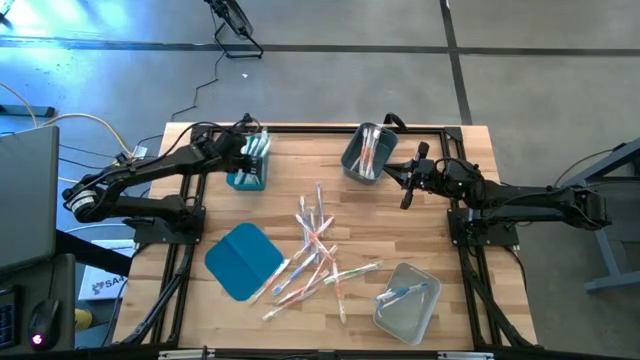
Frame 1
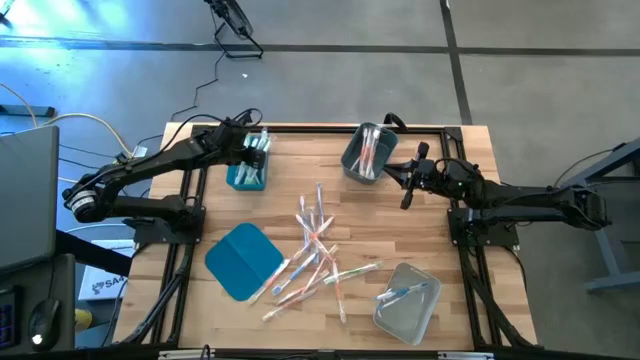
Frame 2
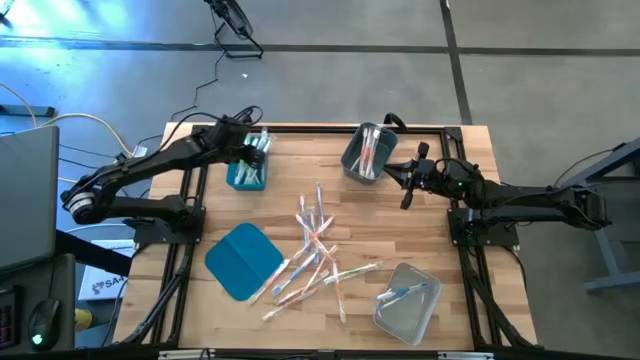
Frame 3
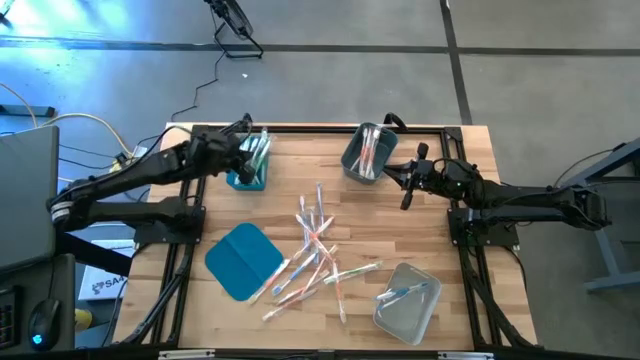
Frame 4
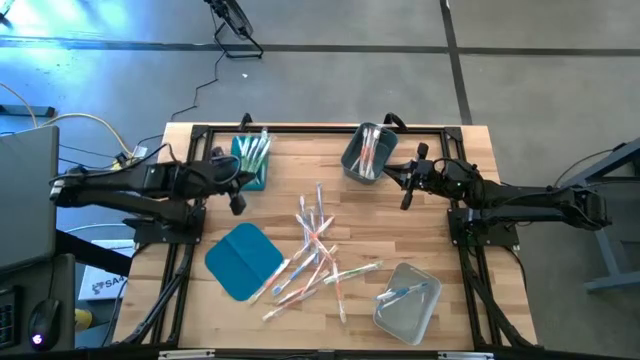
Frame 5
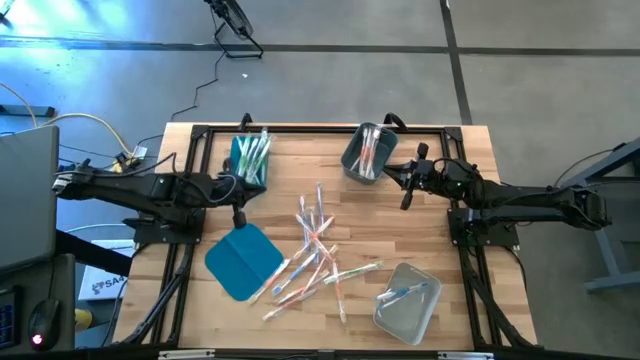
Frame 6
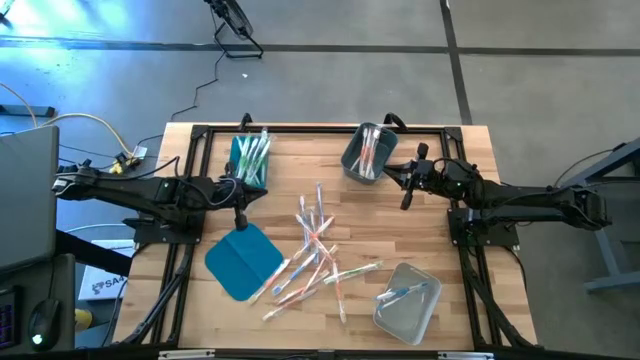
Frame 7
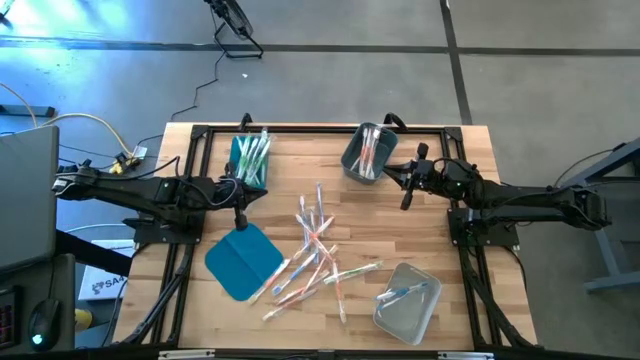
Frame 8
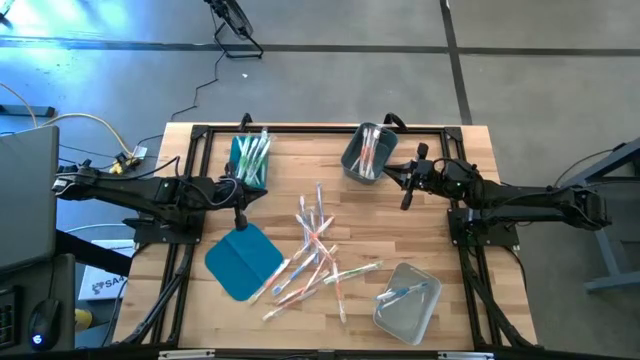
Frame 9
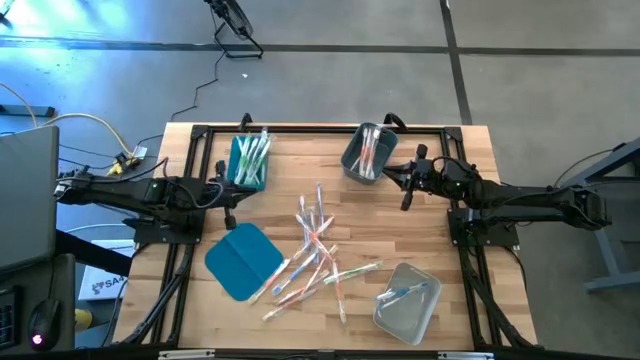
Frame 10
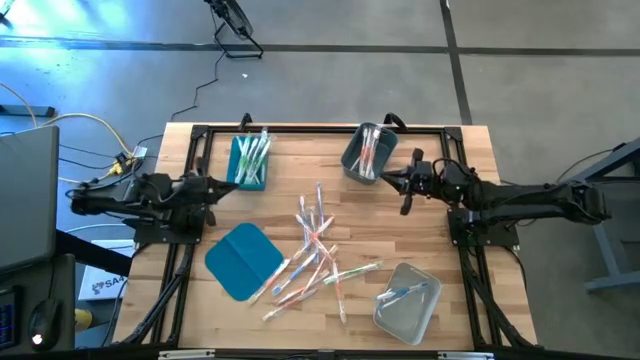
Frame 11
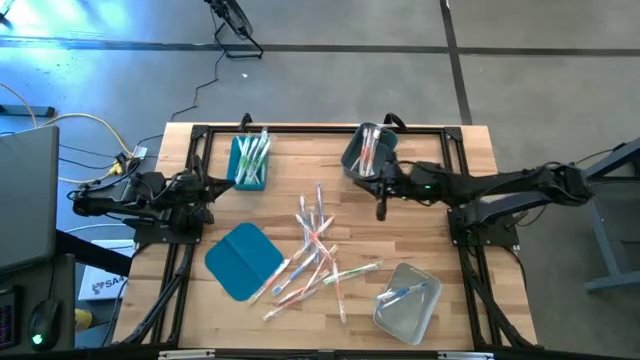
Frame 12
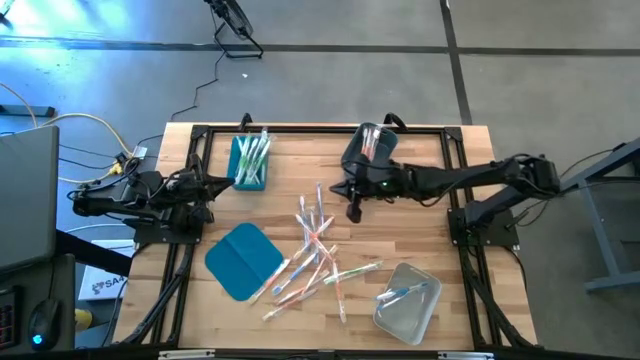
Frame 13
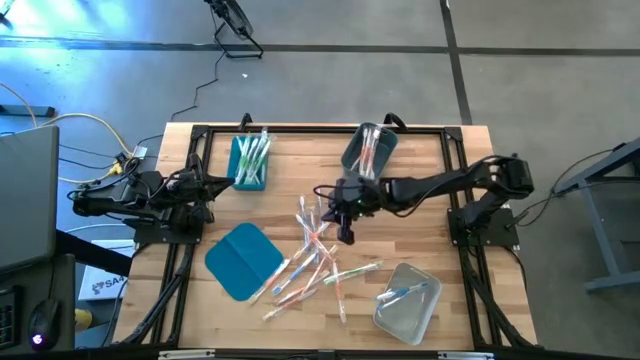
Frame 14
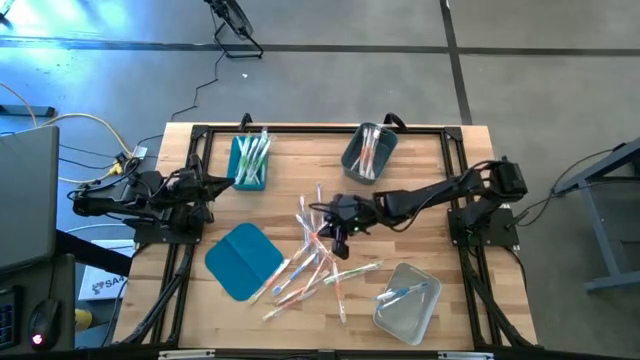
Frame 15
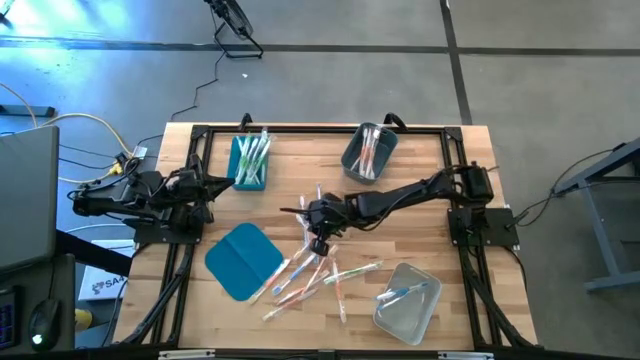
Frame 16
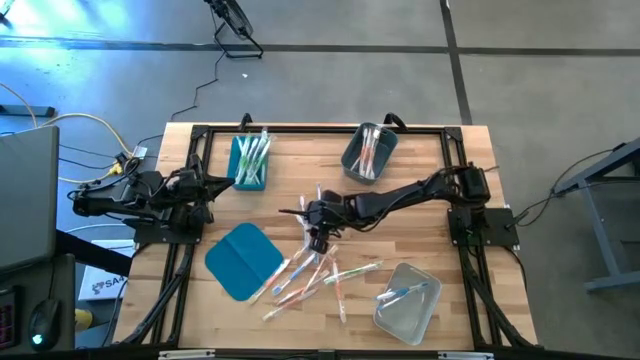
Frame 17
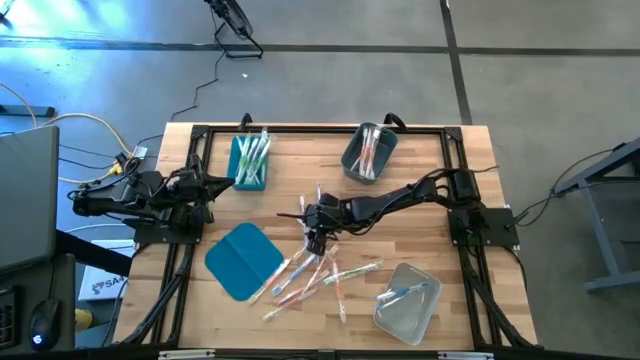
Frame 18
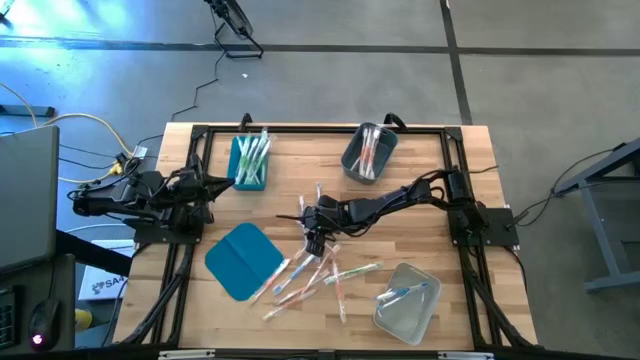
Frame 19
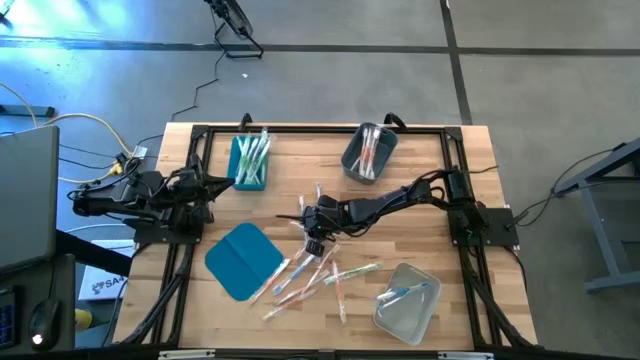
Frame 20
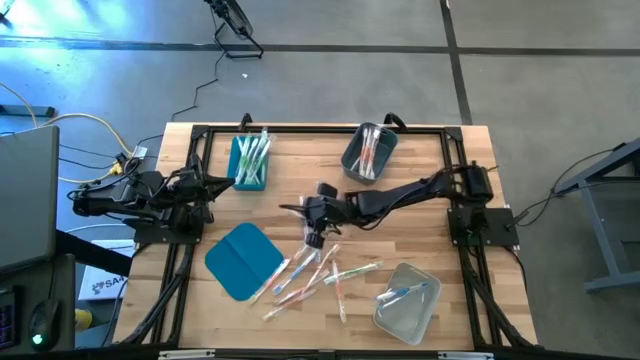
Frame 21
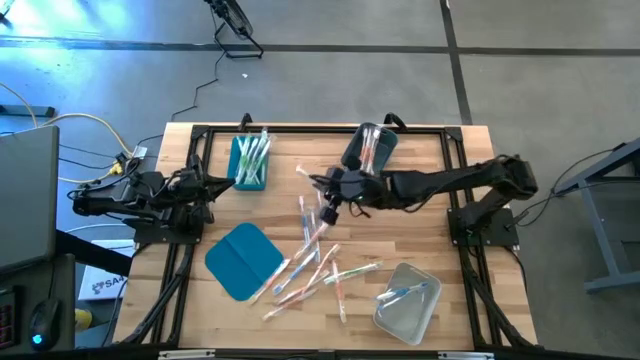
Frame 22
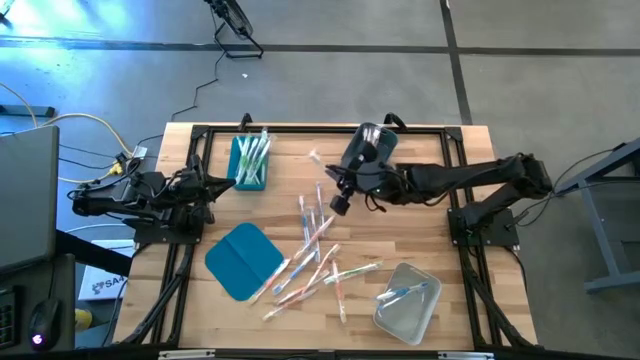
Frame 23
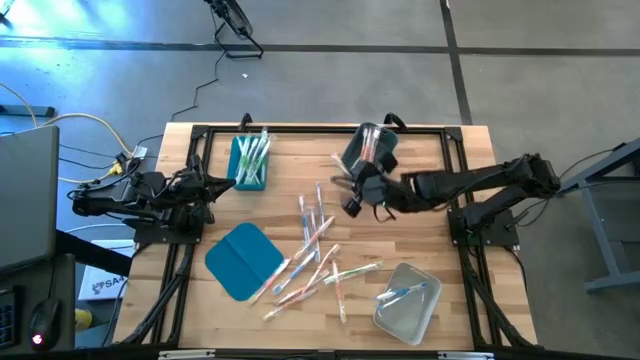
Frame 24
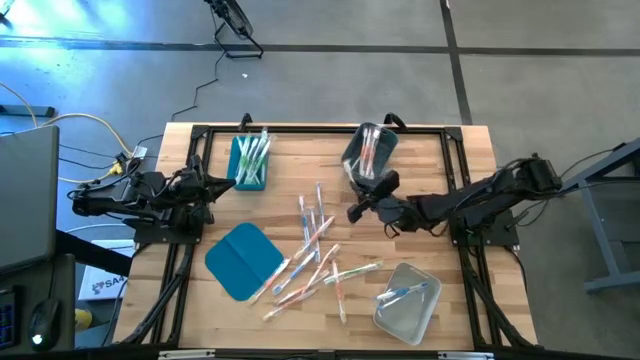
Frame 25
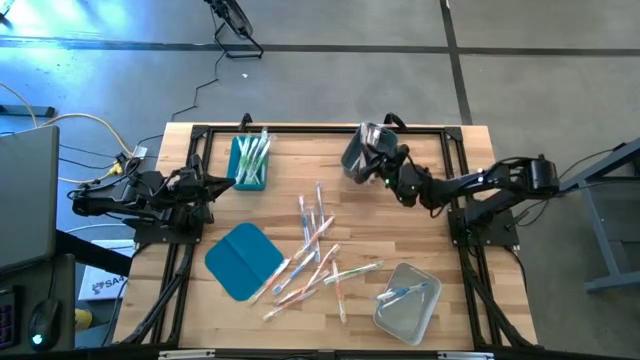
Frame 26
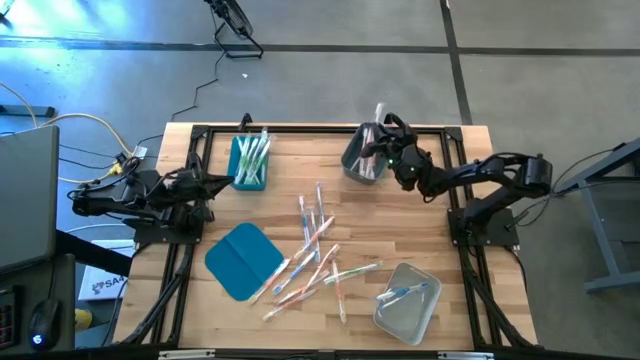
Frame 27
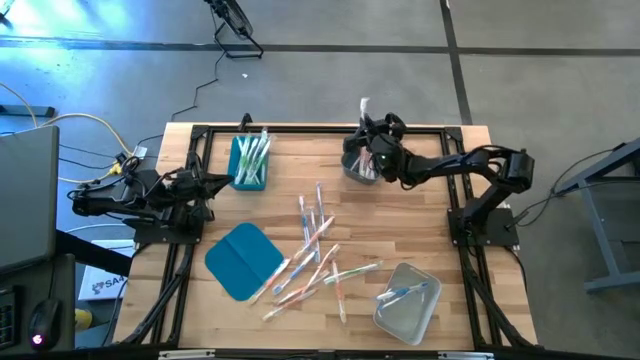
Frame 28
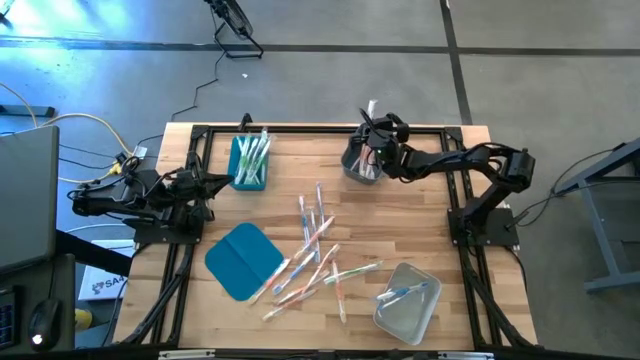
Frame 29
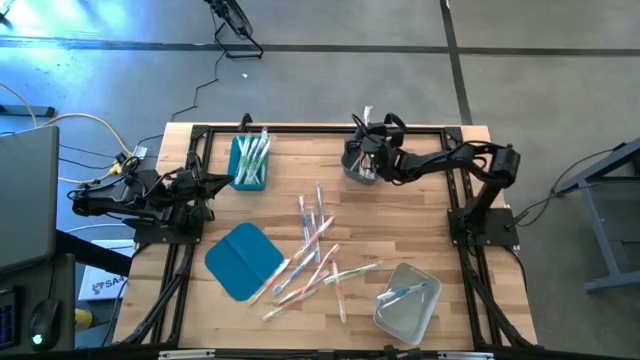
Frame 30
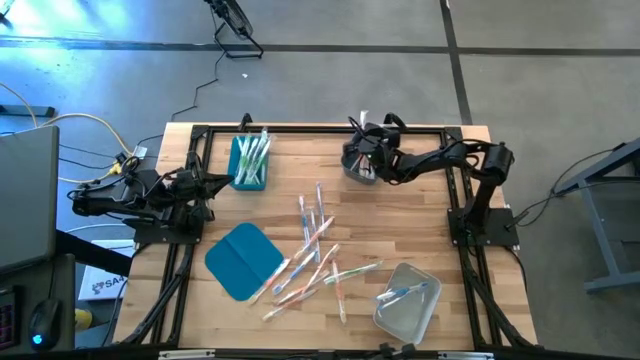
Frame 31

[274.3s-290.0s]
Task: Pick & Place Toothbrushes
Put the orange toothbrush into the dark gray bin
